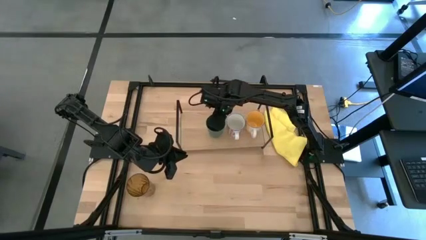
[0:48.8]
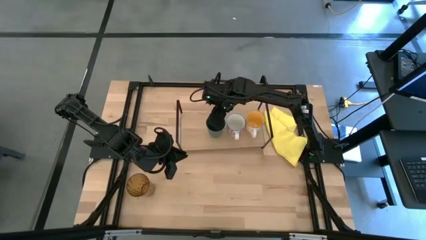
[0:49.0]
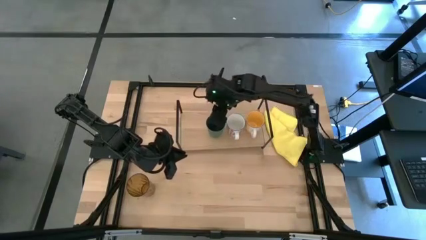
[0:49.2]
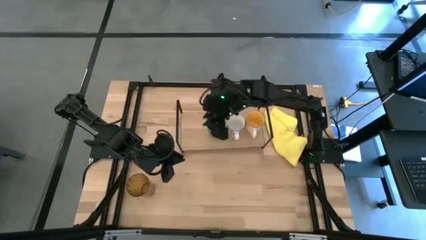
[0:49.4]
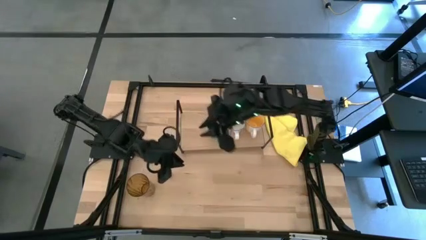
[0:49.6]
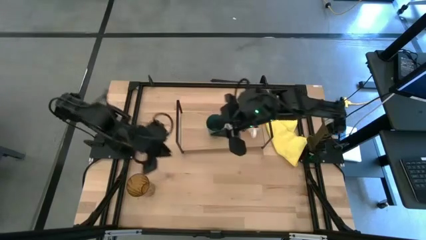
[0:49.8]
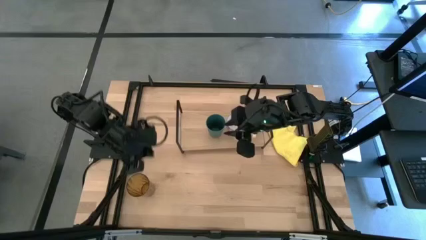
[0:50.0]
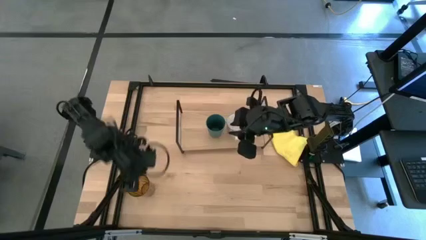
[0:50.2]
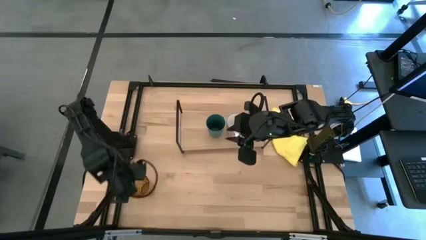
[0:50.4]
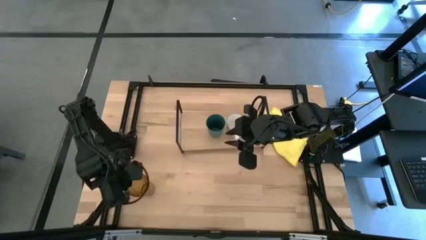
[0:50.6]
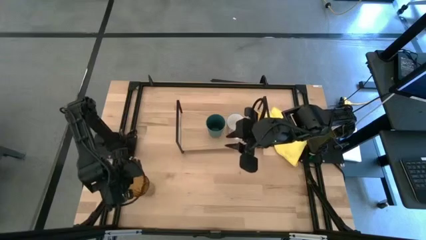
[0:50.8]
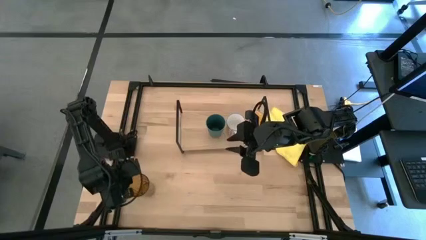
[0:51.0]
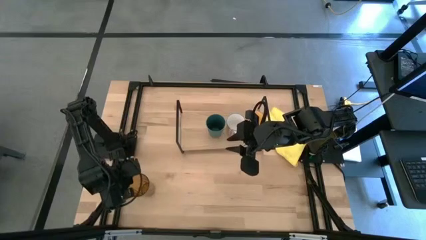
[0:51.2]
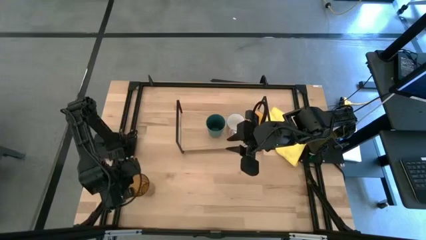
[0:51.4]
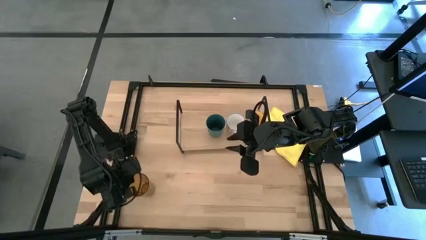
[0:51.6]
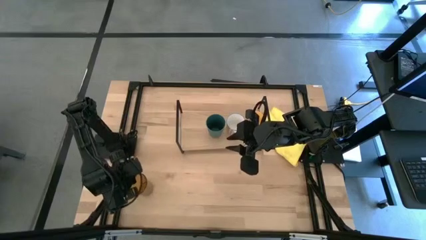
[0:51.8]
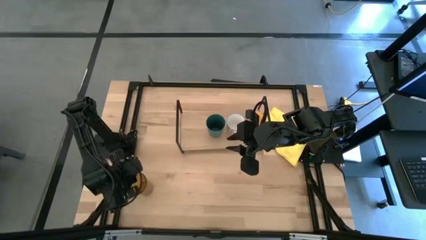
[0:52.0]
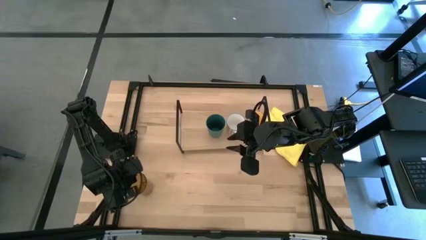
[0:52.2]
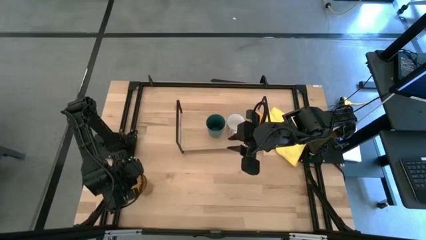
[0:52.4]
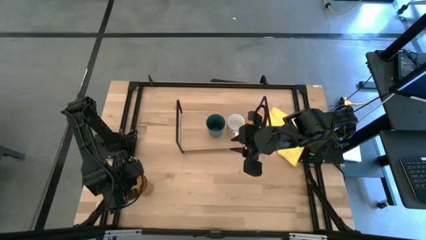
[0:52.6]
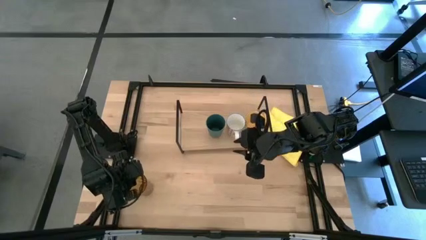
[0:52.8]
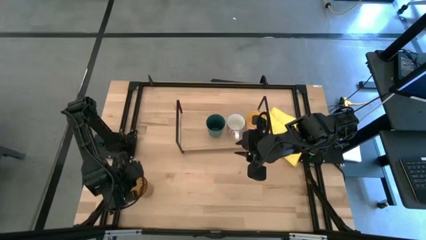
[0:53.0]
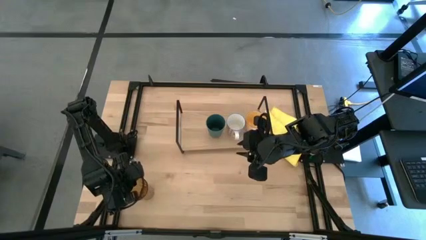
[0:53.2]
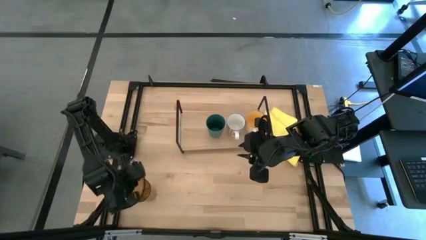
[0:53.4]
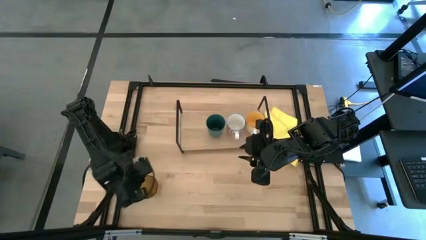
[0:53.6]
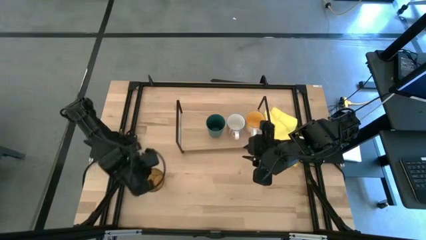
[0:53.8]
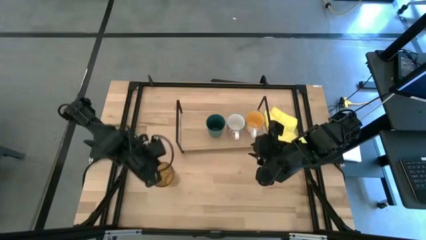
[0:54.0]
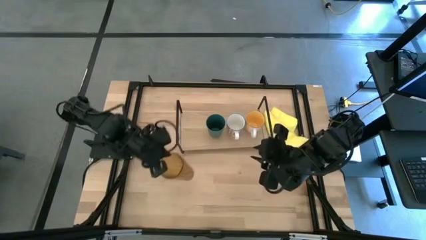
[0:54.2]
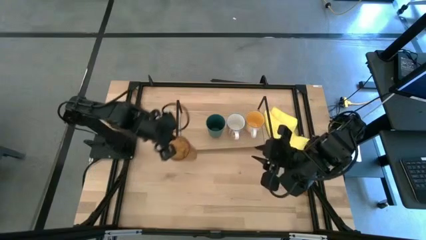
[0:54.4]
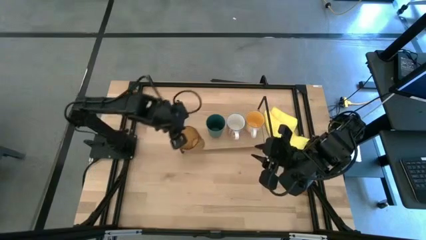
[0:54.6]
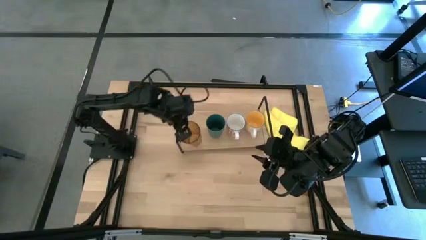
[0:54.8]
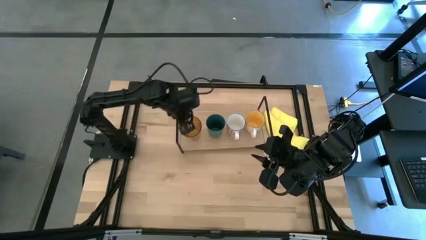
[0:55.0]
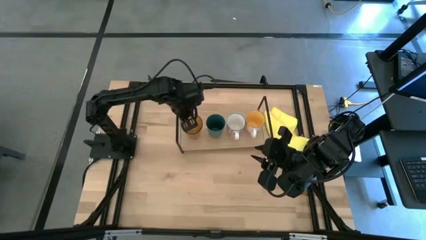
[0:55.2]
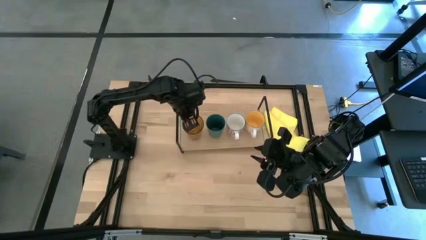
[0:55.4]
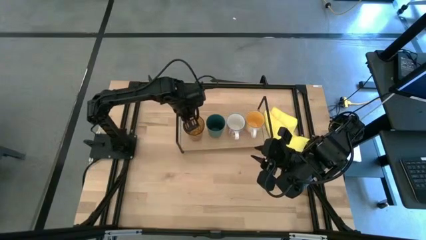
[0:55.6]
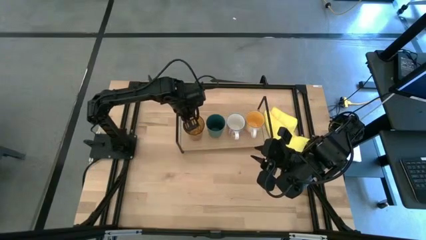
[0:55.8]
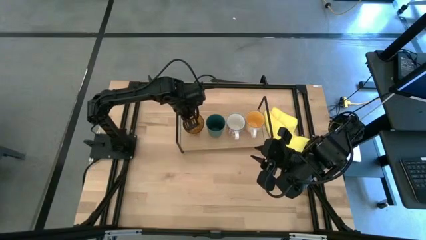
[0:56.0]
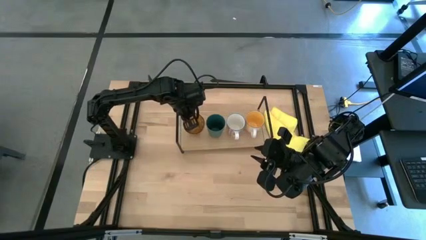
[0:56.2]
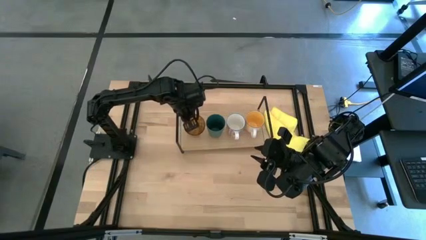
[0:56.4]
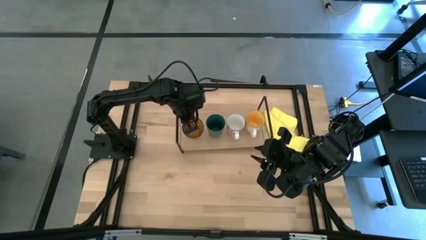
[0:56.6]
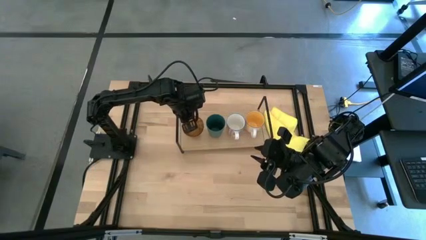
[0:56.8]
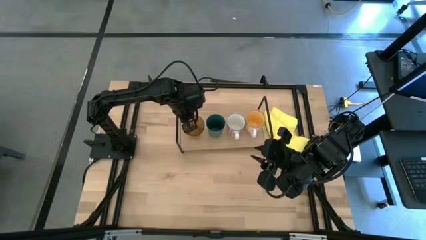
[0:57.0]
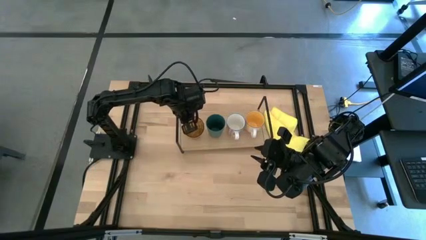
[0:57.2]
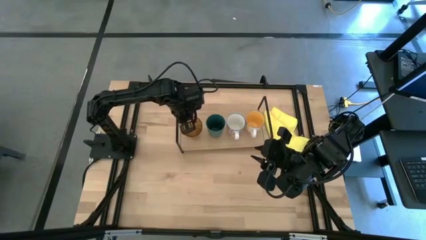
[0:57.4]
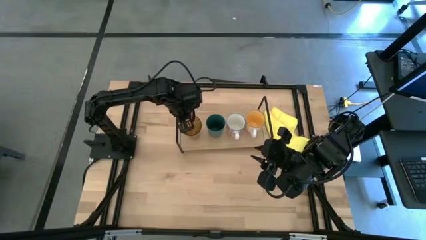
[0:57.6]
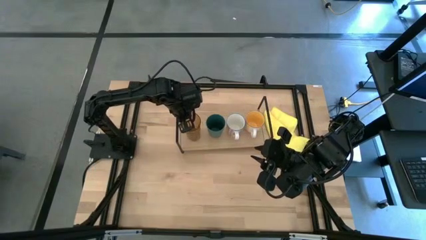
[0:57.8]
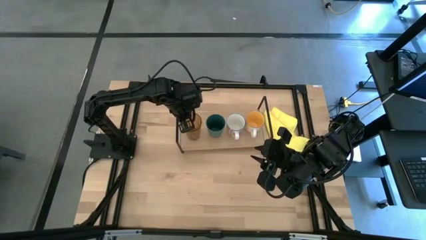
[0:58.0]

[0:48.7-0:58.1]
Task: Stack small to large cups/mugs on shelf
Put the orange cup on the shelf

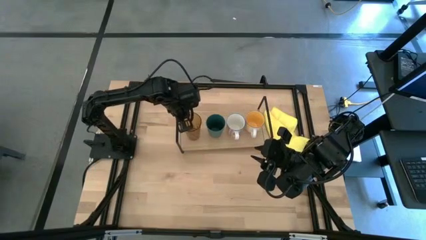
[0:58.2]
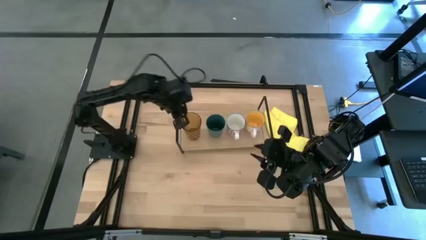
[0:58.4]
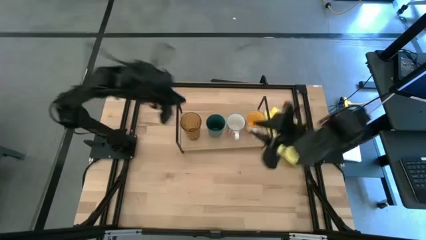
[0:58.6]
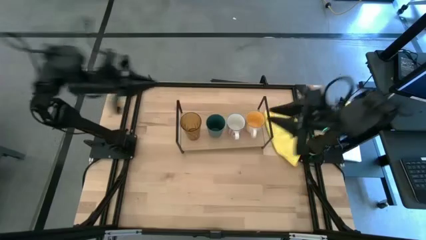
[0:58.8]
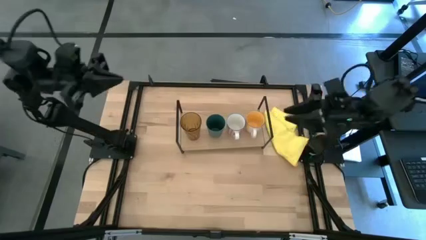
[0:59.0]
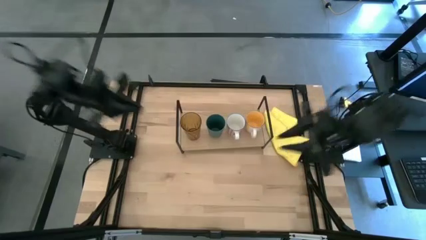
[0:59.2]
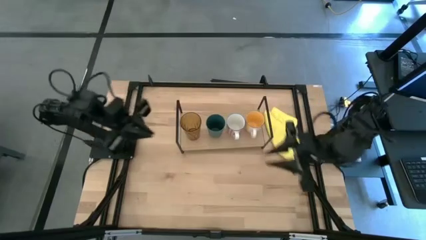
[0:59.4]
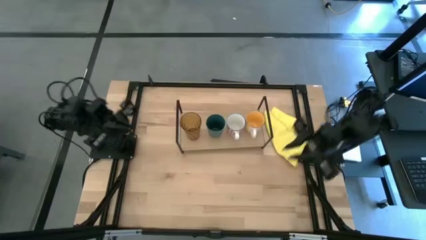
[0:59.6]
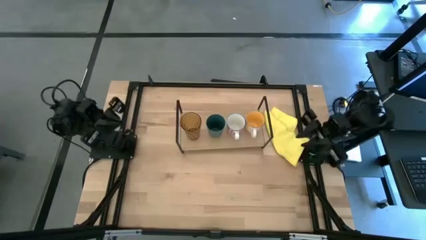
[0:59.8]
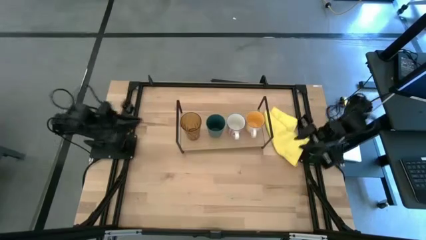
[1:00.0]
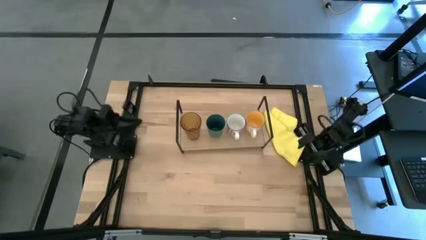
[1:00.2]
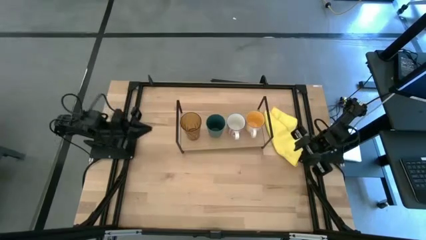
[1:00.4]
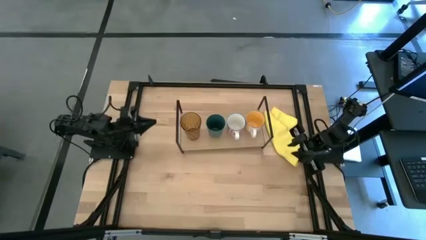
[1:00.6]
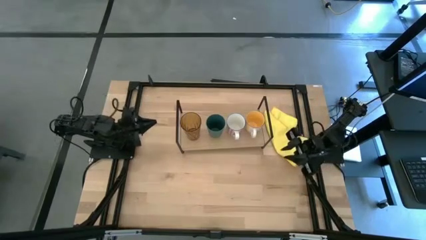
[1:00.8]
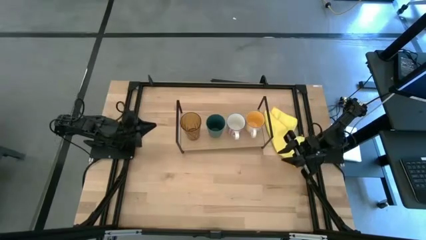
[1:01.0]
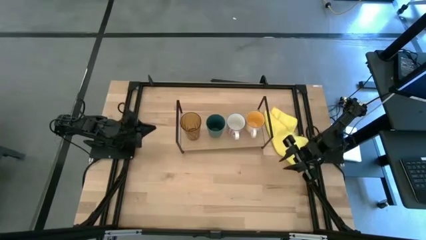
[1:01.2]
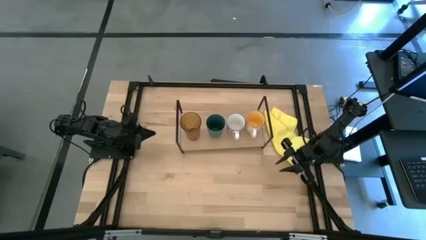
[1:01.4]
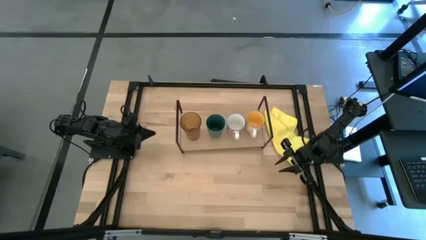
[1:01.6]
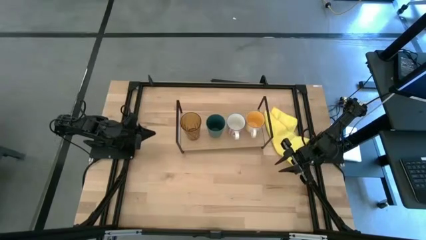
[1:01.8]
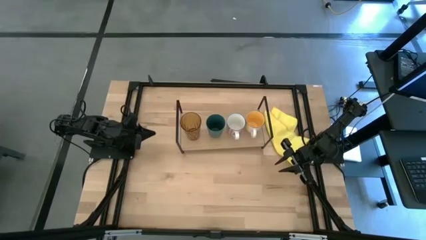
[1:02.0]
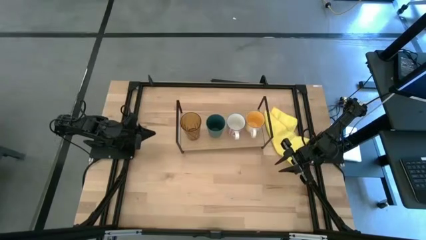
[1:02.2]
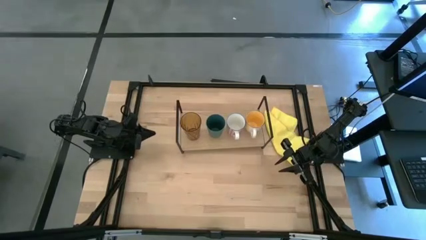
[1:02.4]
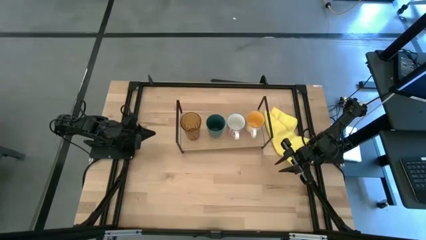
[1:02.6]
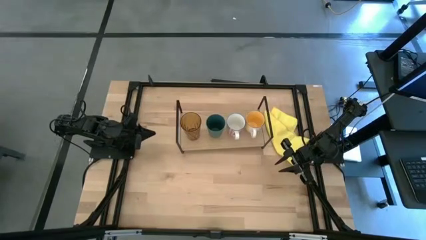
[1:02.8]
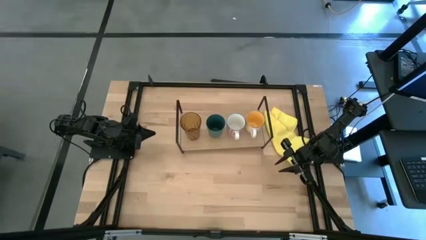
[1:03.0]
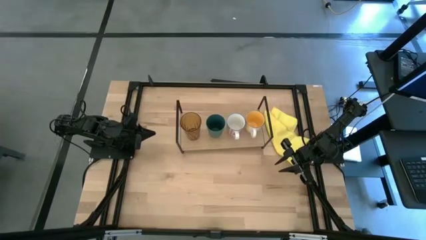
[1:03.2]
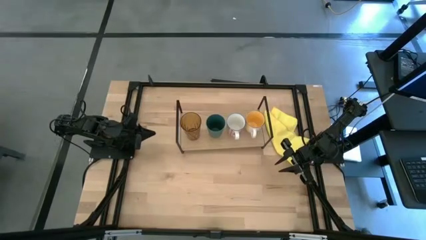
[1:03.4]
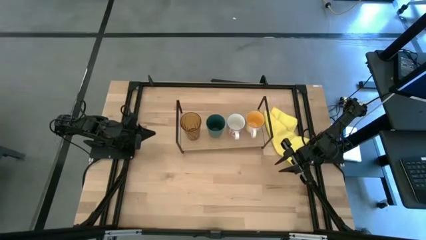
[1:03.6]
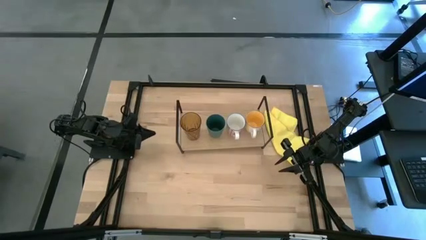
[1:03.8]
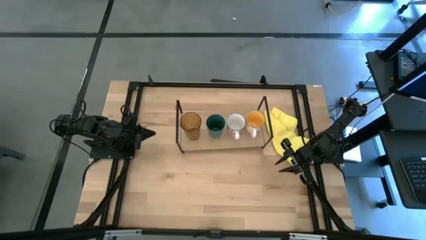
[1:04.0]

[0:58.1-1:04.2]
Return to Home Position
